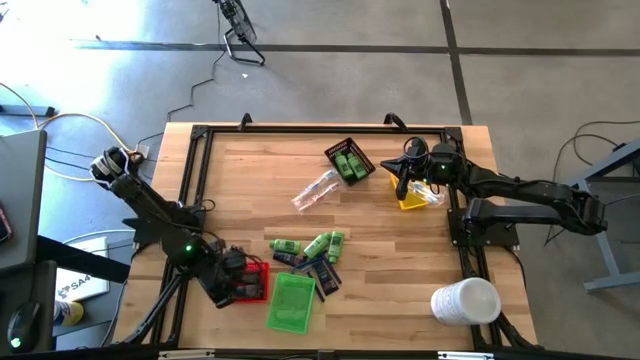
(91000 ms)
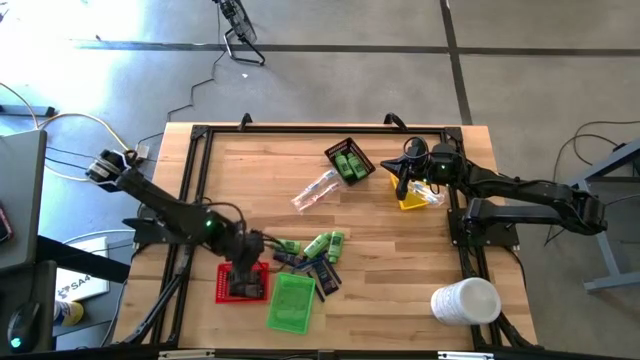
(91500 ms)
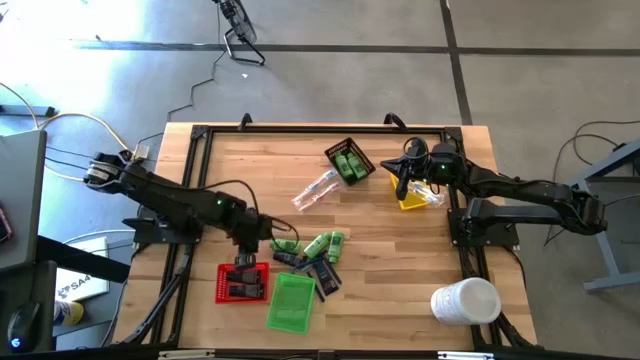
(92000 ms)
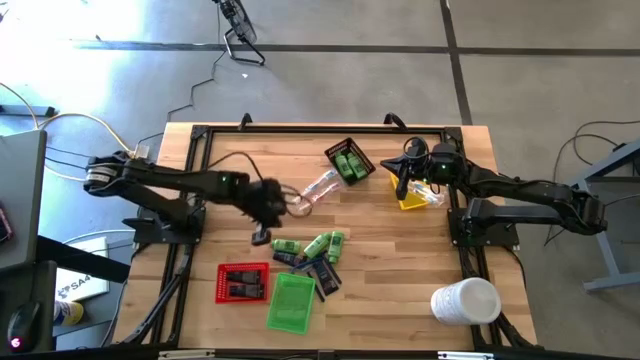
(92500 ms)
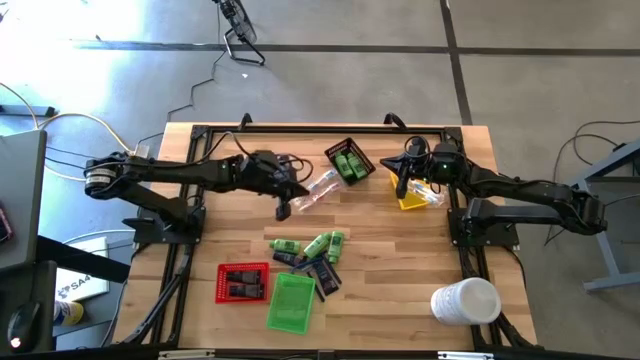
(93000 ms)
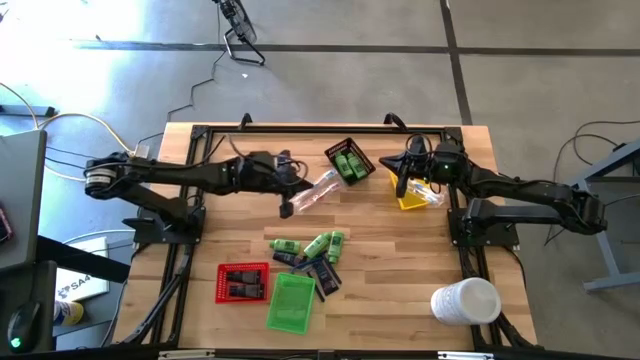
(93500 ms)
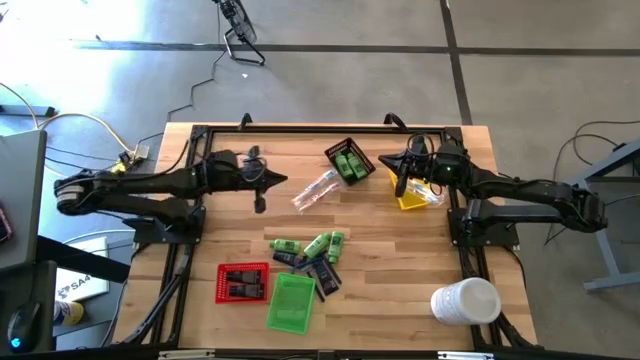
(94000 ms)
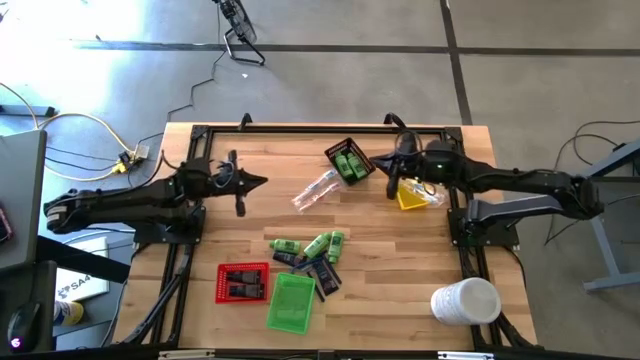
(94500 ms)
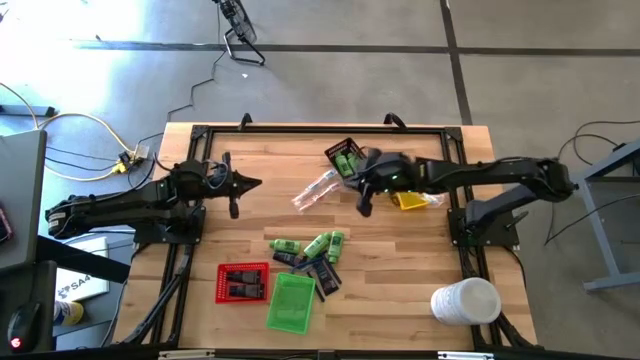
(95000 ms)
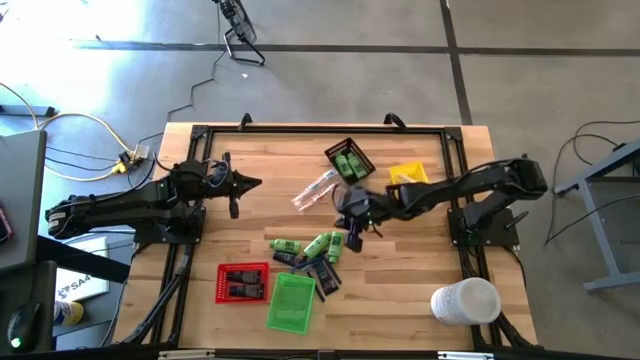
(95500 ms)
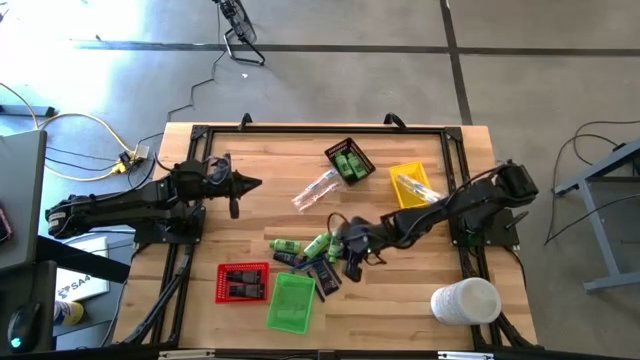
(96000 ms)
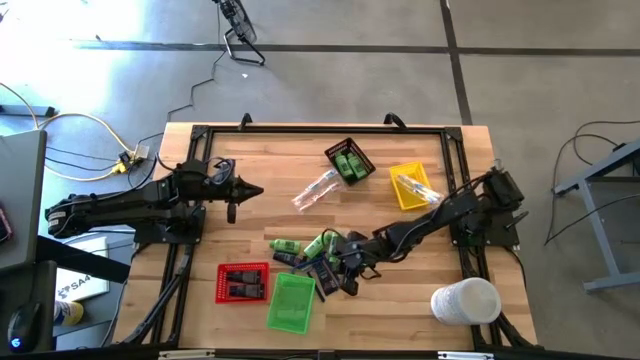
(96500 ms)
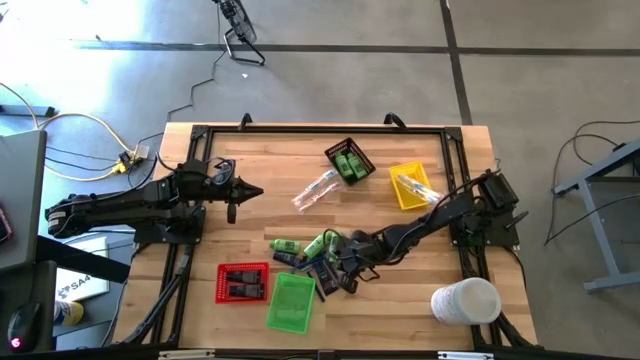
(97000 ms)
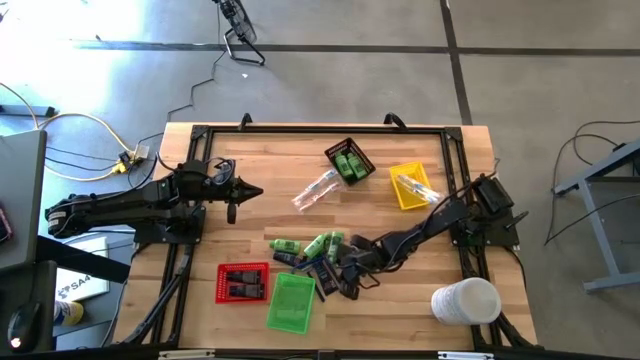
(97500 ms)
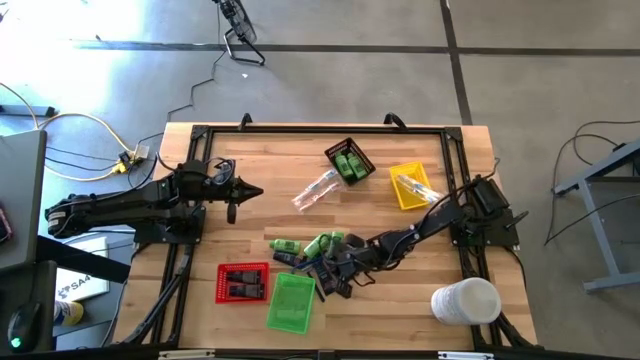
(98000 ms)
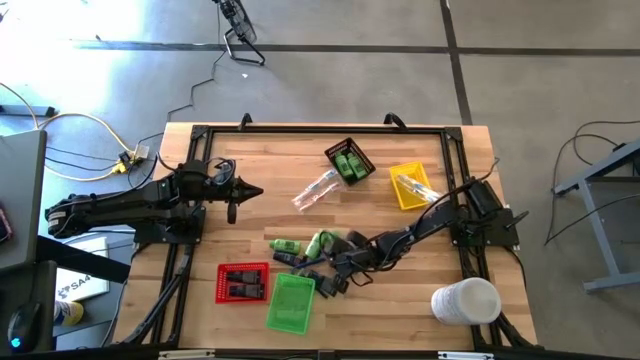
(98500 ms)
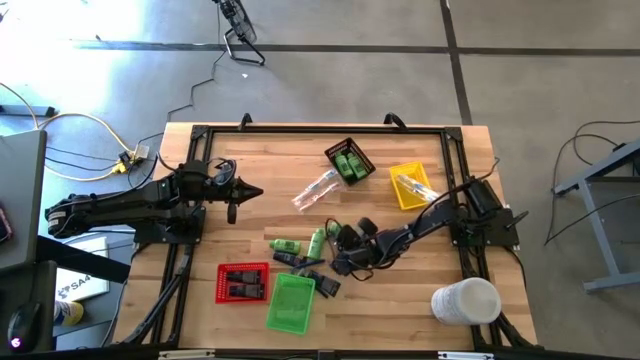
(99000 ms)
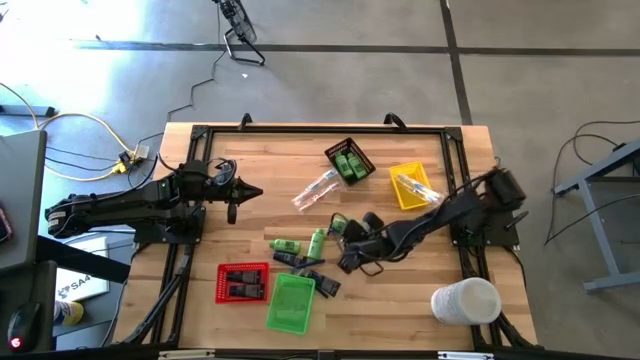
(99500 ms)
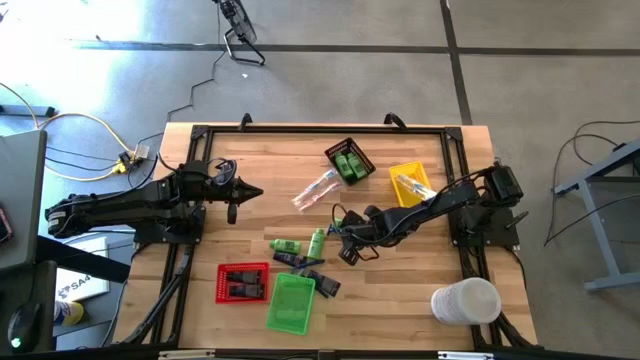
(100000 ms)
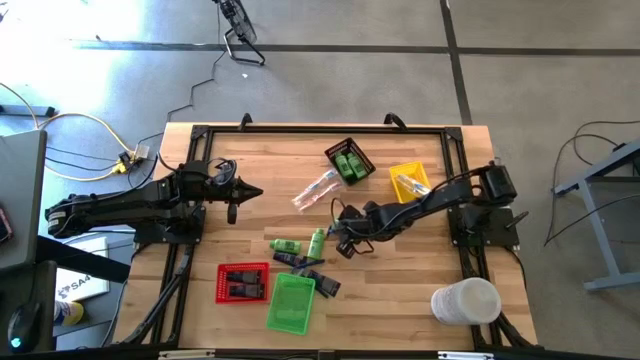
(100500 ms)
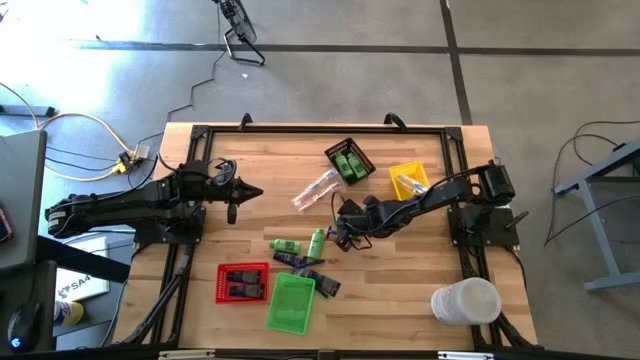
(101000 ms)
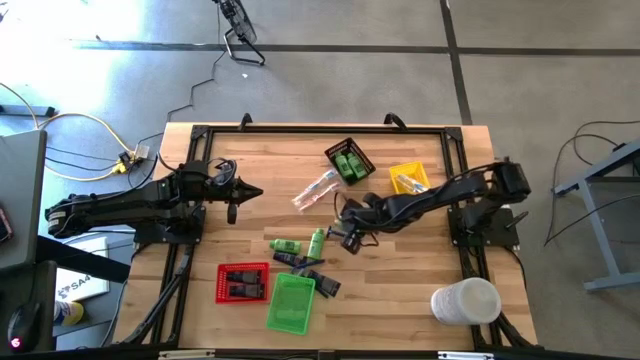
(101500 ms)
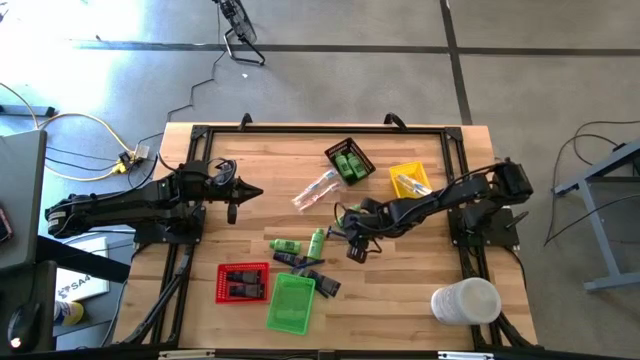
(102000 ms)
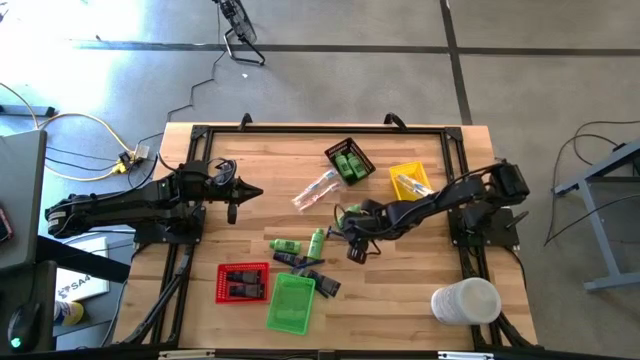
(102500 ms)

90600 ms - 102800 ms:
Task: Pick & Place Travel size toiletries
Put the right razor into the green bin

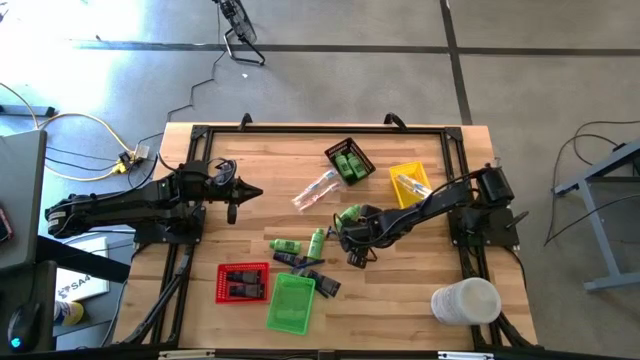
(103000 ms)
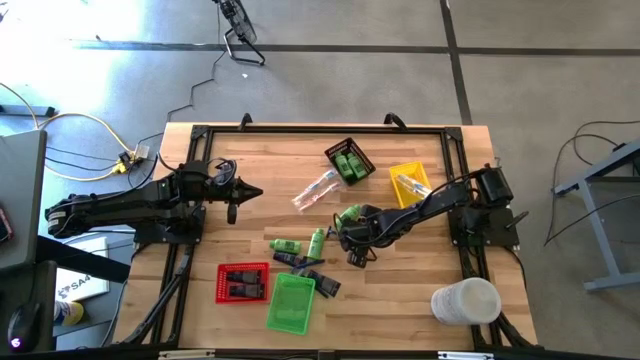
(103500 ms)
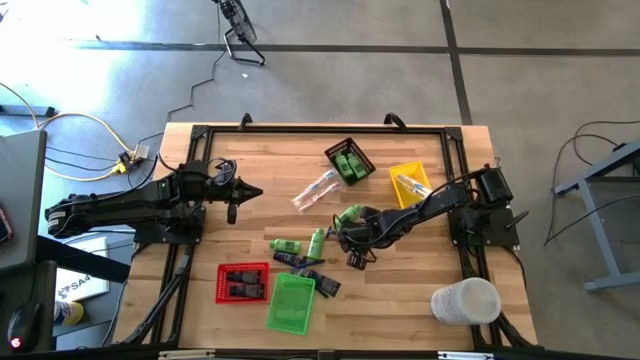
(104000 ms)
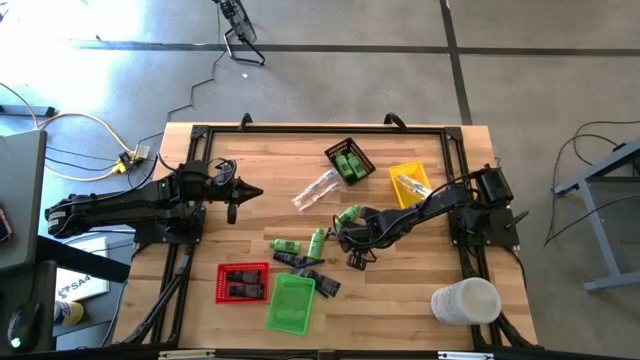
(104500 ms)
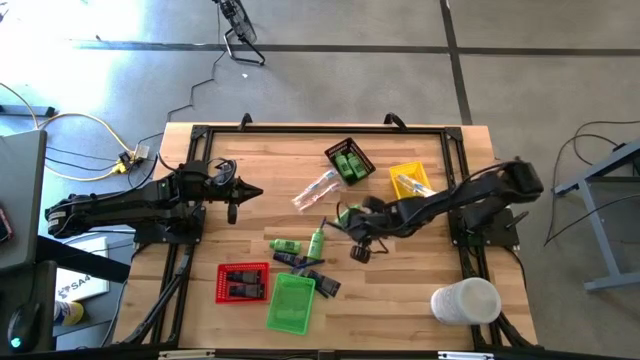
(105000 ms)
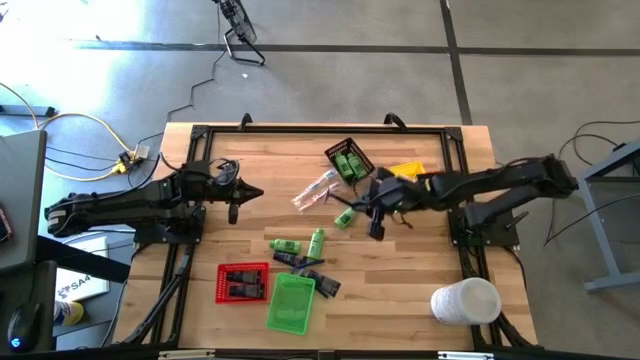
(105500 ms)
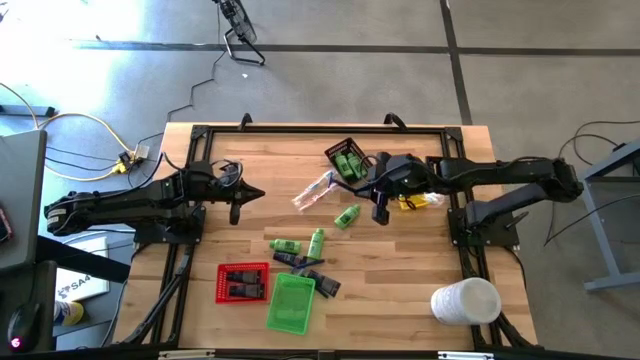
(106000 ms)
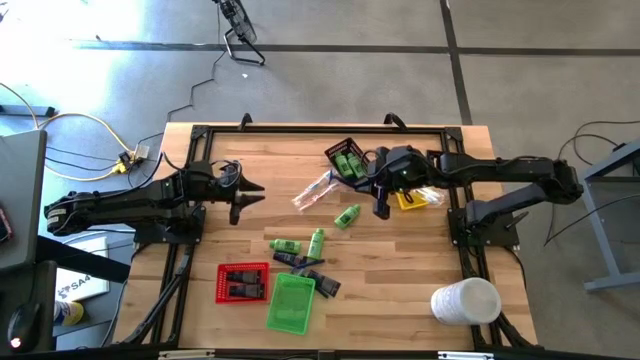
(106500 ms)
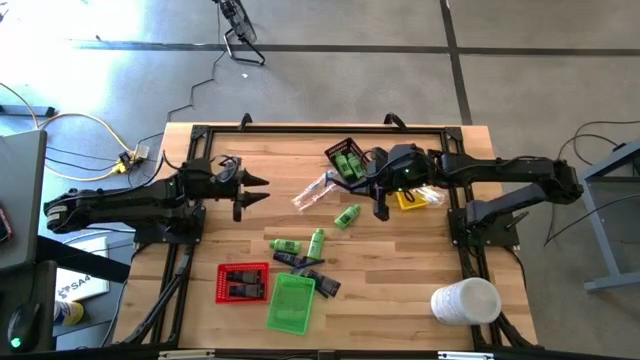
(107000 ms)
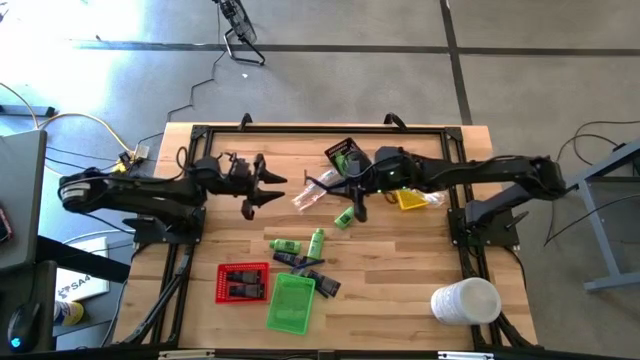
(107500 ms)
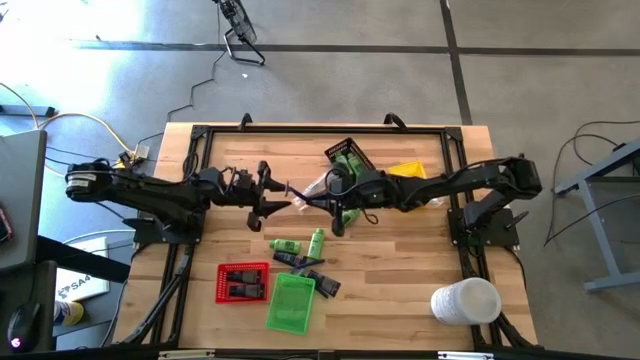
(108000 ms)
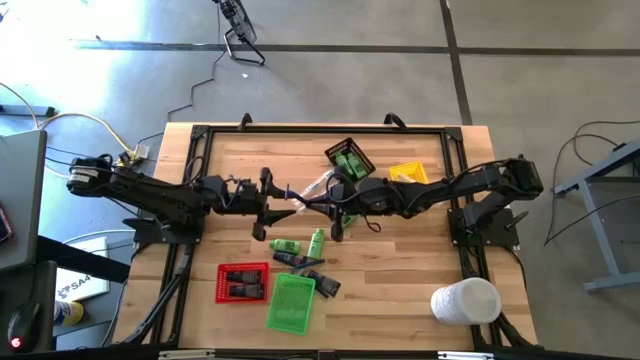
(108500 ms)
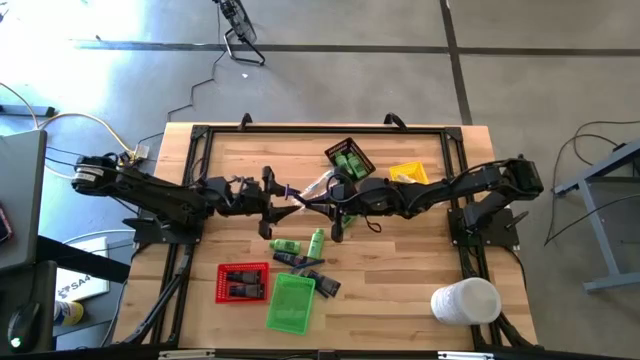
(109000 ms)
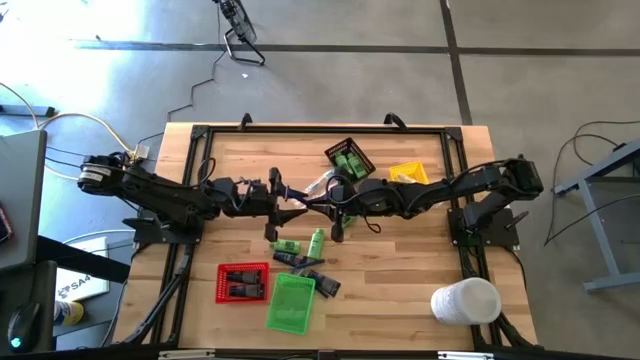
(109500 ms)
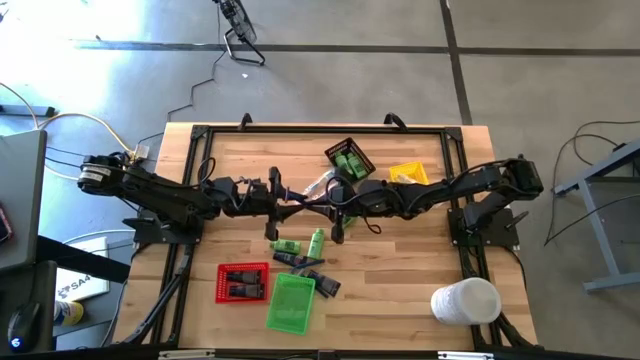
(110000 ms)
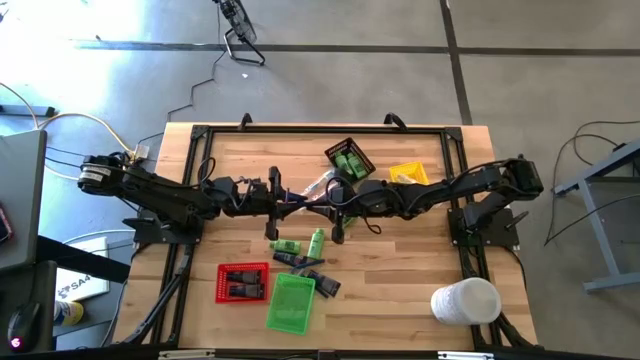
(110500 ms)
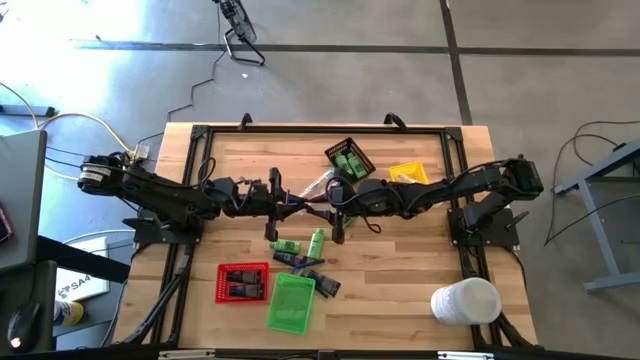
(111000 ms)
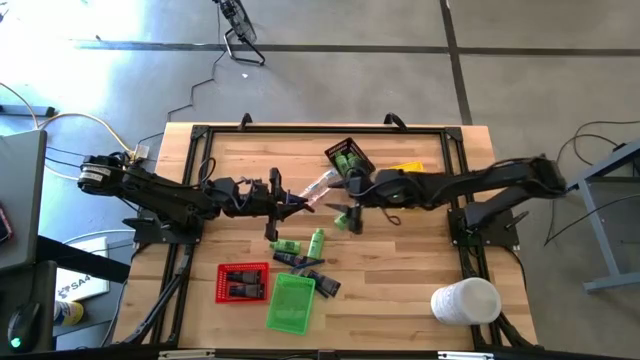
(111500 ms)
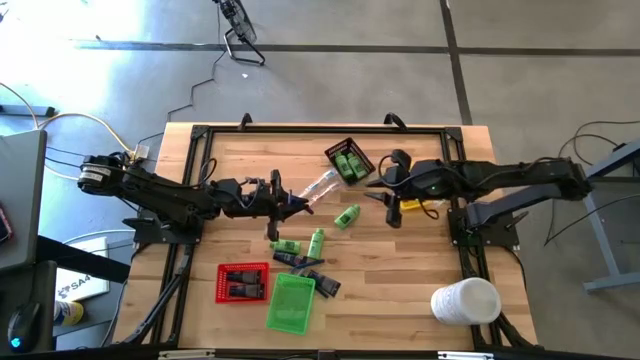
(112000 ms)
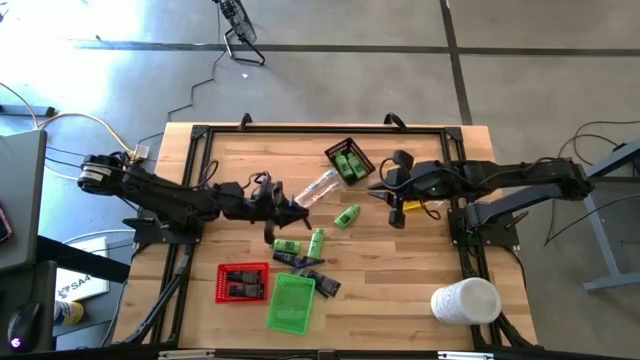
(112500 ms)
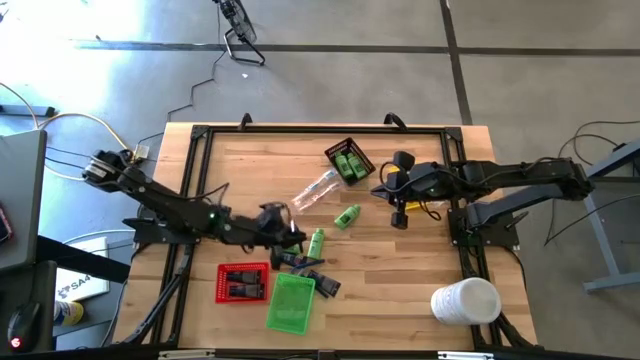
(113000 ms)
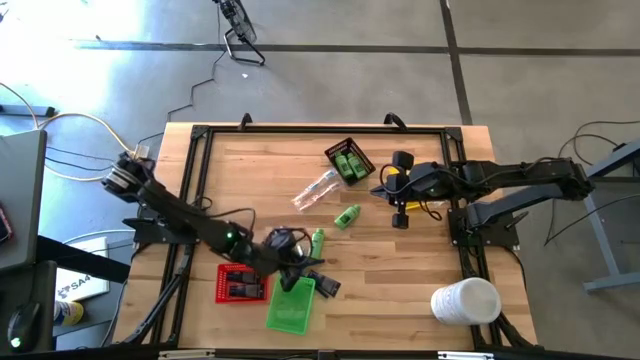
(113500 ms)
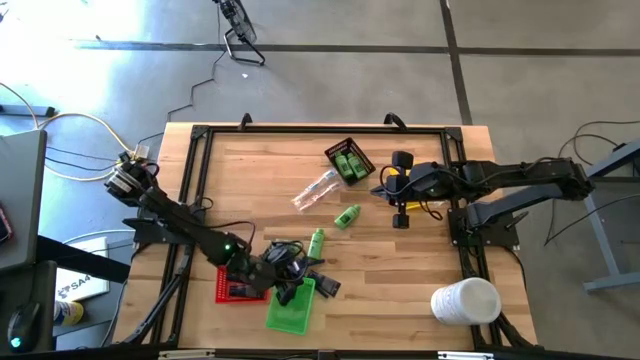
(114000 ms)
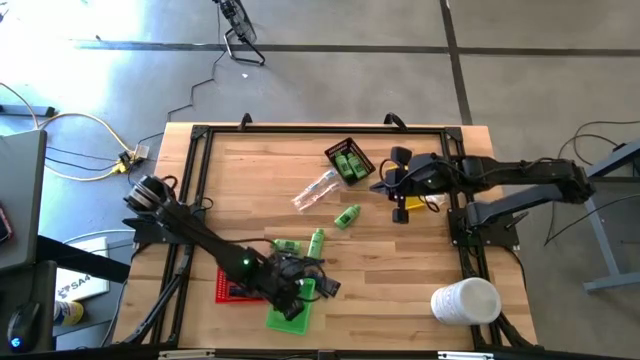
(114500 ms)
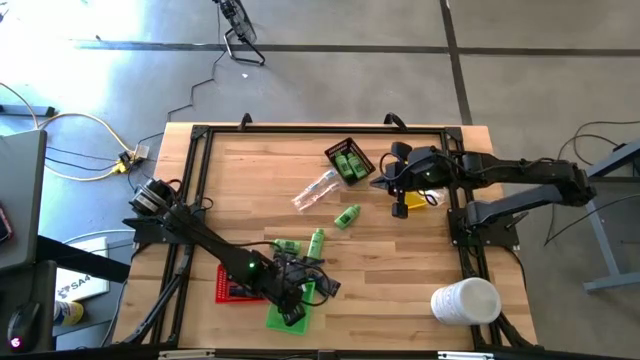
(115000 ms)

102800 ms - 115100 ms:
Put the right razor into the green bin
